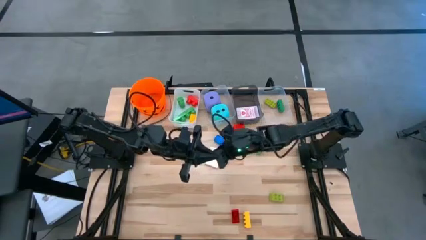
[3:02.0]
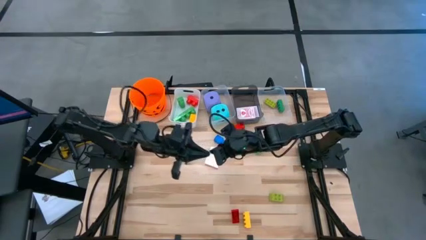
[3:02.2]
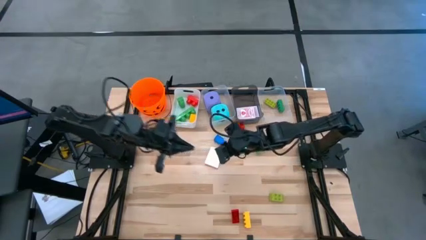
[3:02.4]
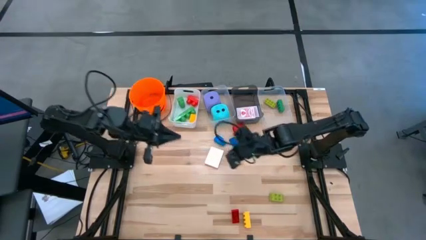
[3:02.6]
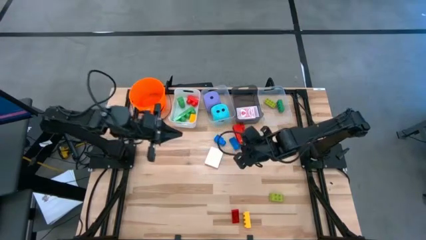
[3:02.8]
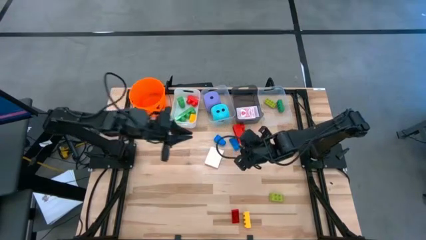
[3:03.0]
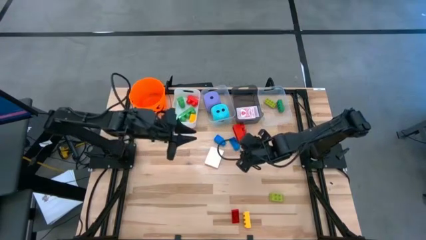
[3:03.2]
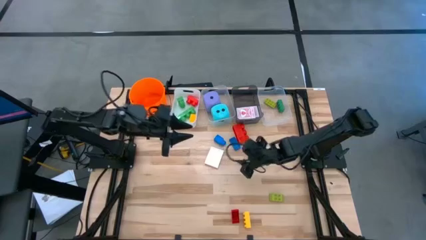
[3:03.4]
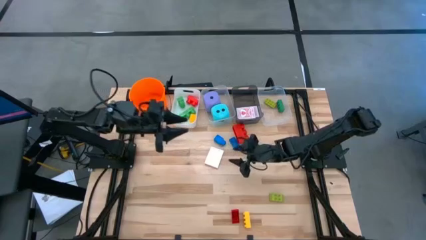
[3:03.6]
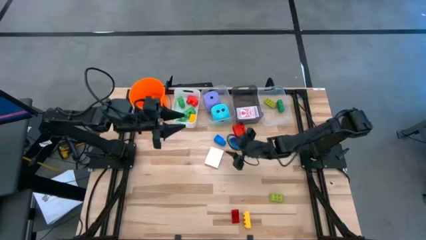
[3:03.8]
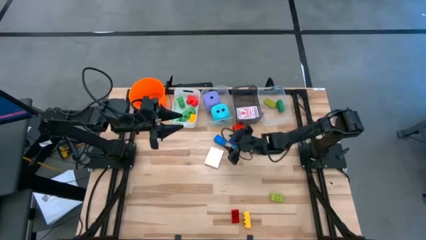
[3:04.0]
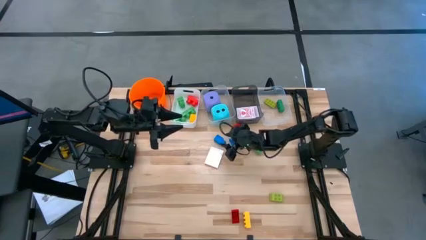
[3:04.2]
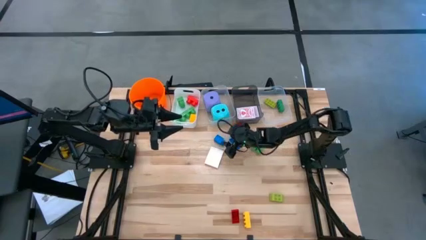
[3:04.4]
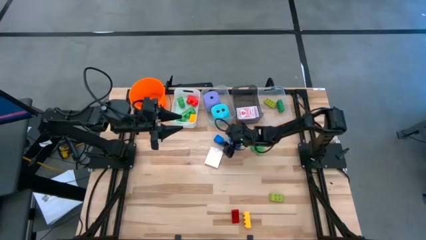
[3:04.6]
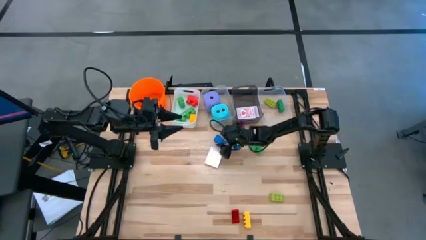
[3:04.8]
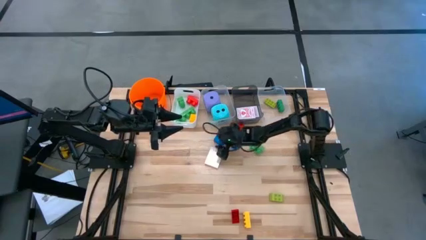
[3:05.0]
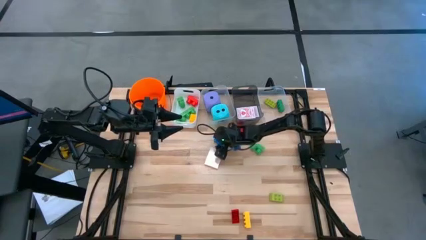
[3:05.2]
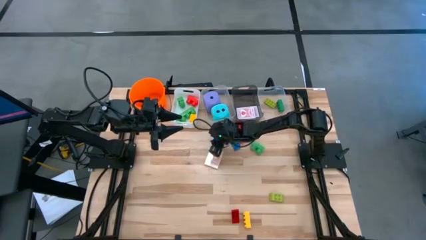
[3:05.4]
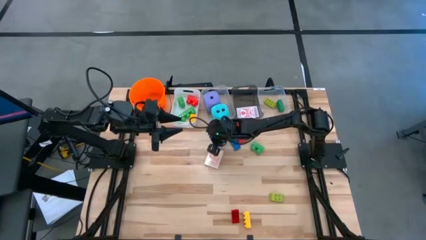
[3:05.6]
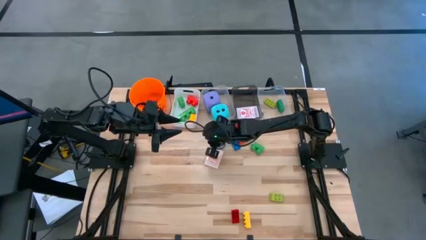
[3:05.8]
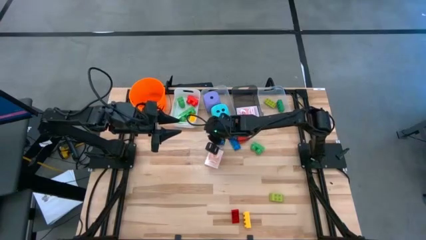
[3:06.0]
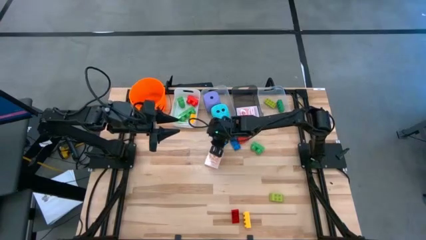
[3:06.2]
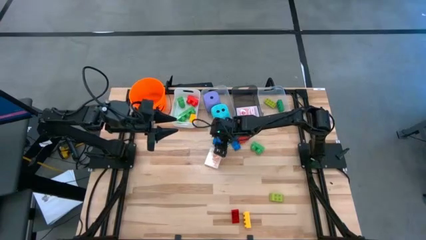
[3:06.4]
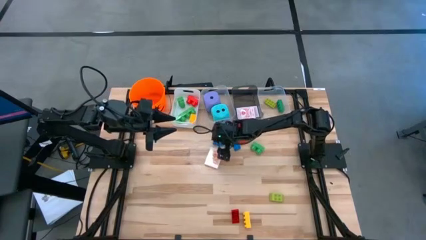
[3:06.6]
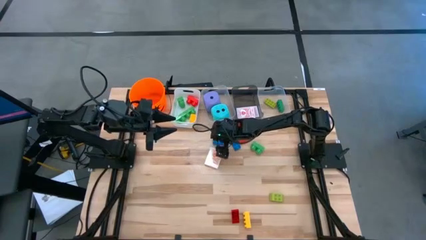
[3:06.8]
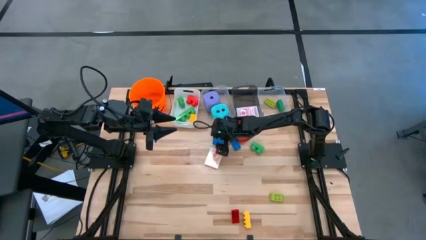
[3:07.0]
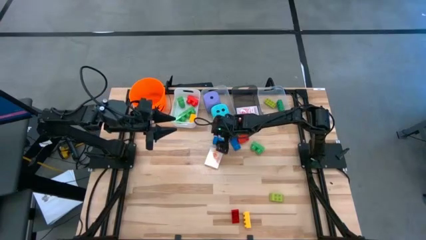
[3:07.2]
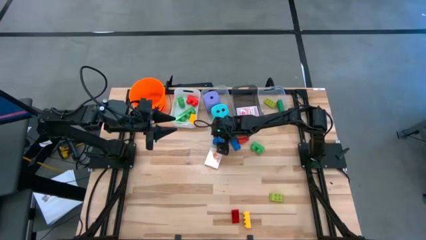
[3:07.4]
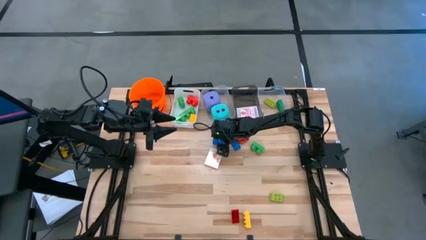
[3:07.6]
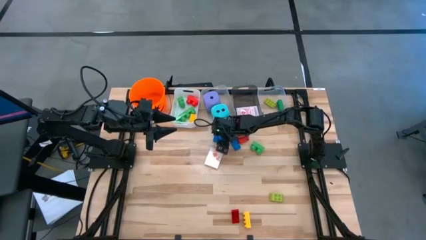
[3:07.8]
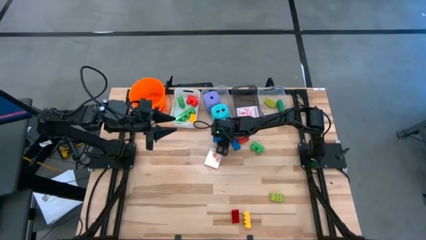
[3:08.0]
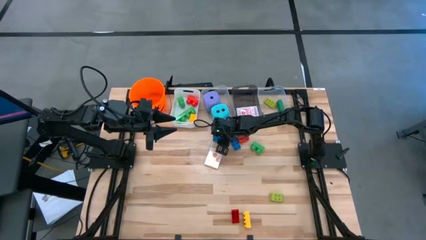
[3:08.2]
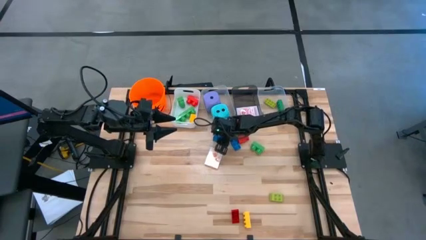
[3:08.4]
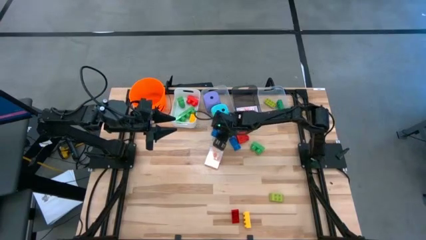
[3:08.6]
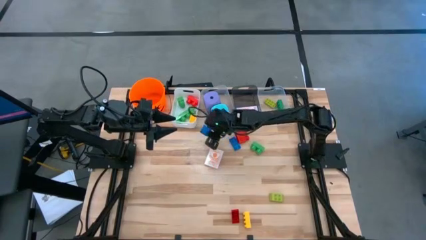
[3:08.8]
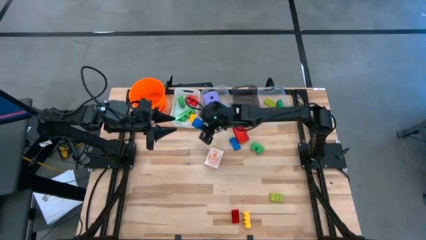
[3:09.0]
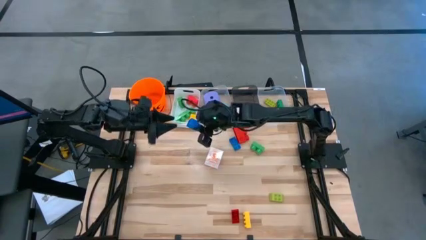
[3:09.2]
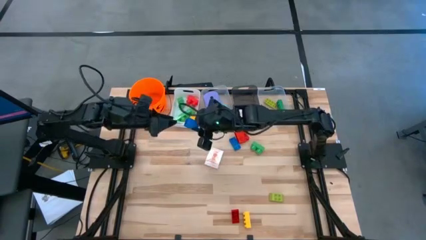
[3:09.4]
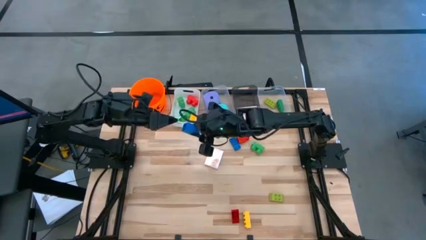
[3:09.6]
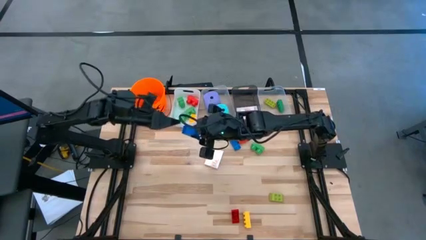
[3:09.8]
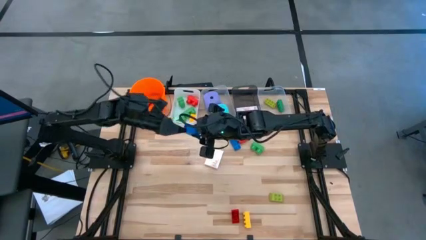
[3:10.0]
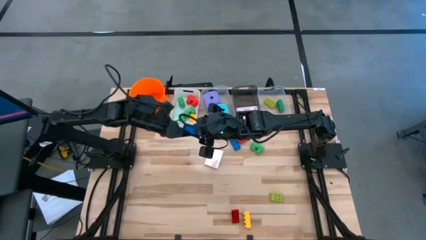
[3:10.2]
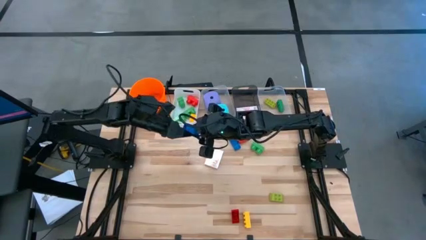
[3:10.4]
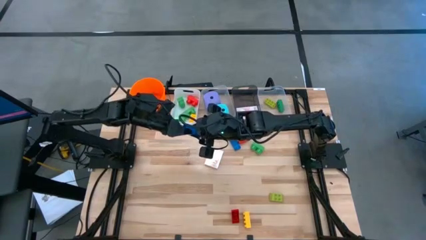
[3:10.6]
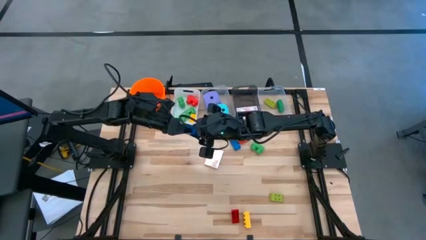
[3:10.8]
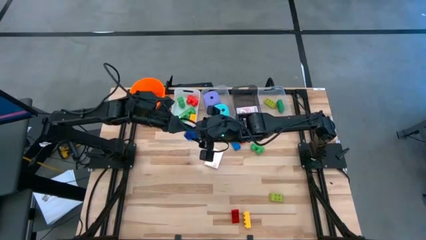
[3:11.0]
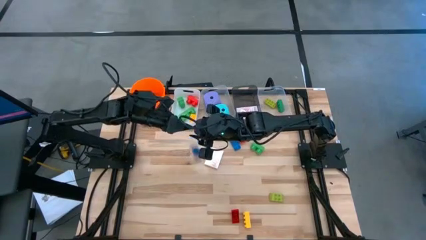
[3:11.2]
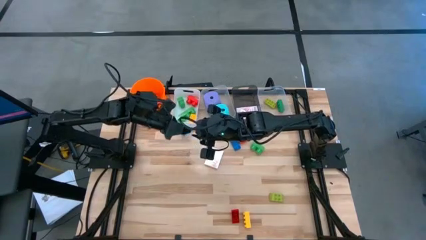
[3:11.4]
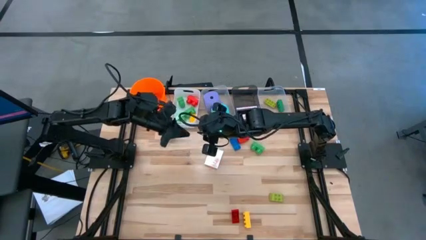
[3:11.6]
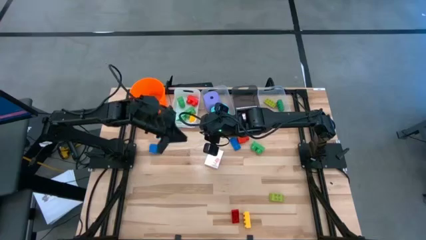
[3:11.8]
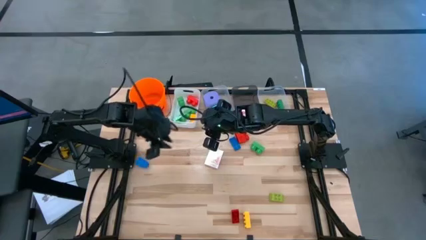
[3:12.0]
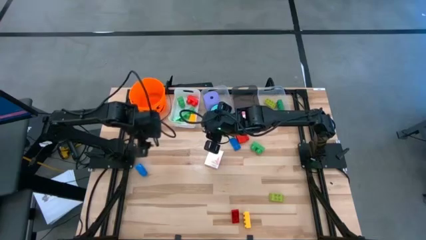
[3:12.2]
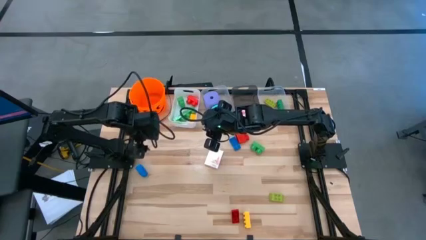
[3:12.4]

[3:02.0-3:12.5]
Task: Pick & Place Toys
Put the 1 stud blue game piece into the white bin

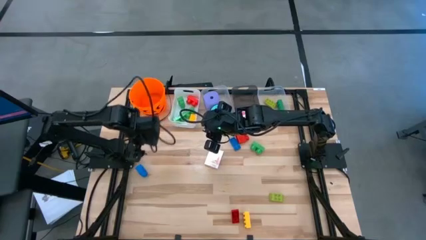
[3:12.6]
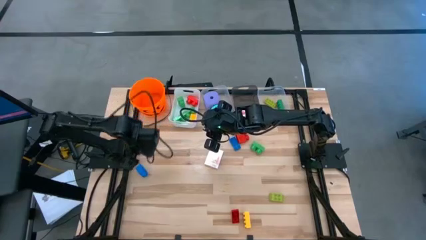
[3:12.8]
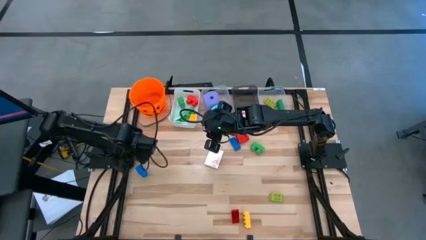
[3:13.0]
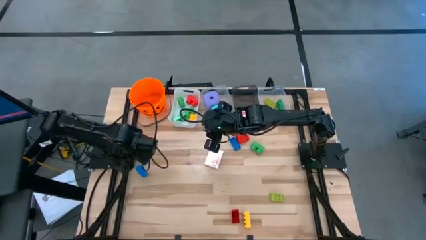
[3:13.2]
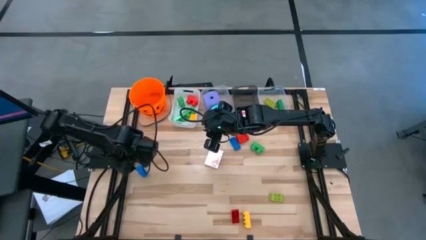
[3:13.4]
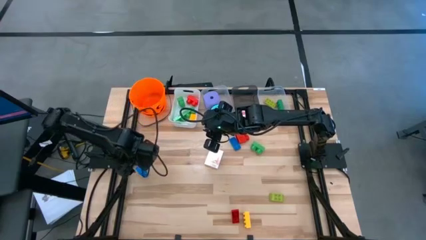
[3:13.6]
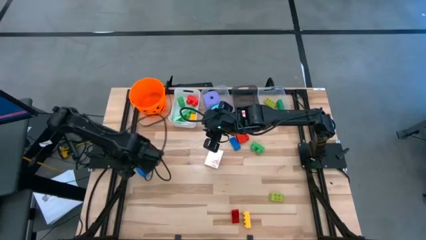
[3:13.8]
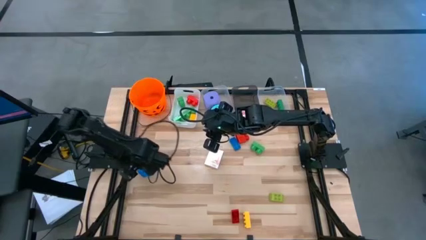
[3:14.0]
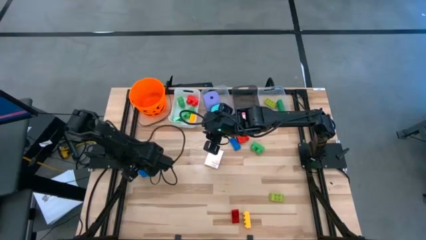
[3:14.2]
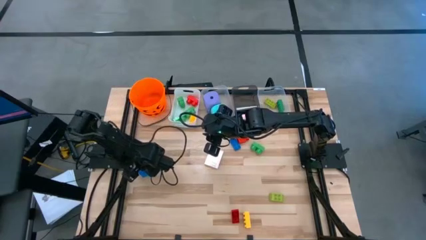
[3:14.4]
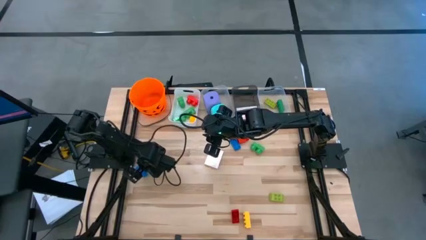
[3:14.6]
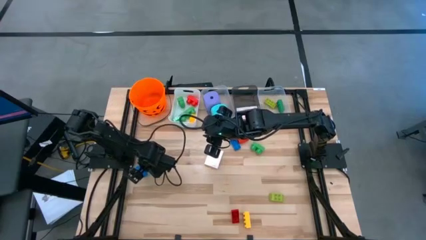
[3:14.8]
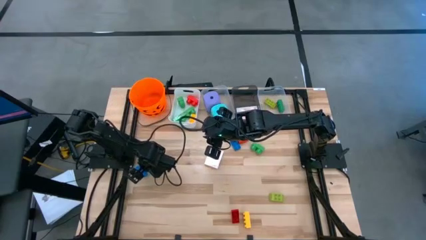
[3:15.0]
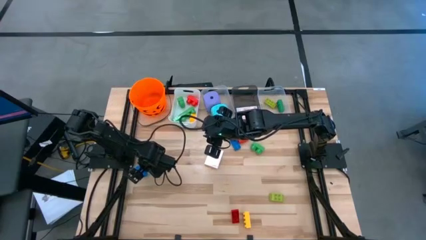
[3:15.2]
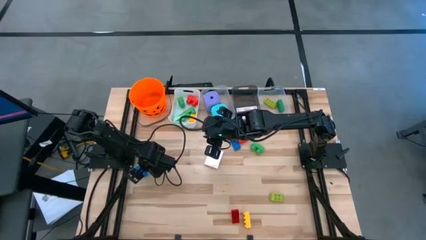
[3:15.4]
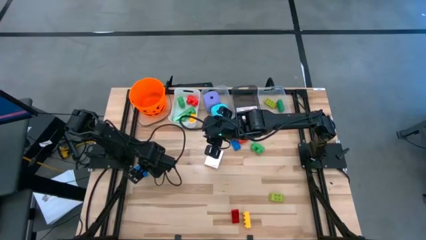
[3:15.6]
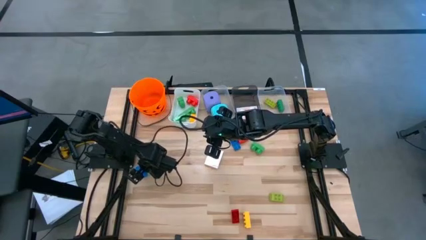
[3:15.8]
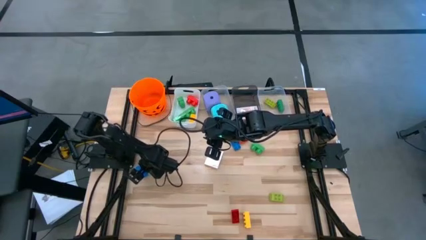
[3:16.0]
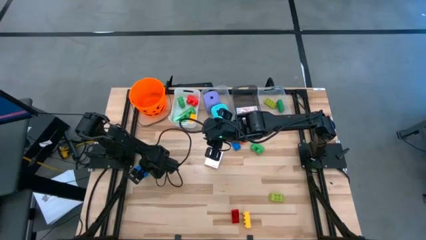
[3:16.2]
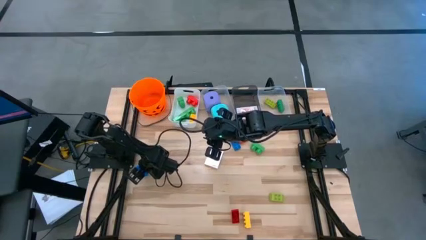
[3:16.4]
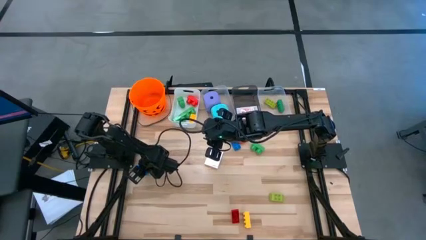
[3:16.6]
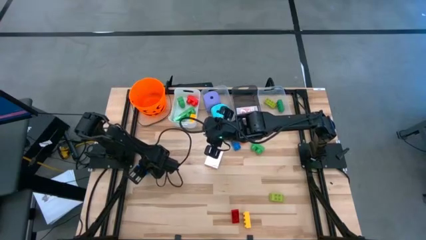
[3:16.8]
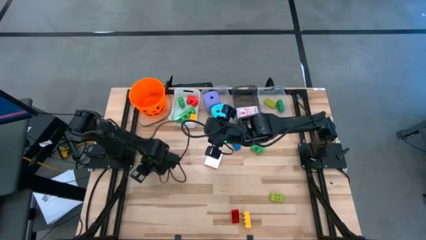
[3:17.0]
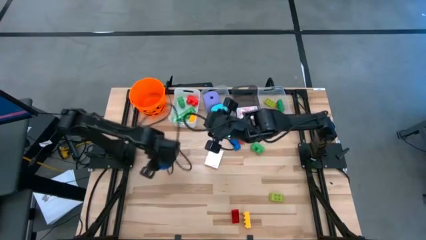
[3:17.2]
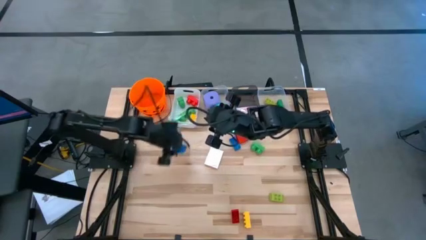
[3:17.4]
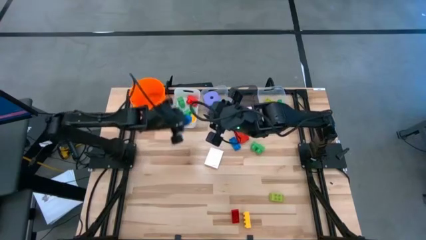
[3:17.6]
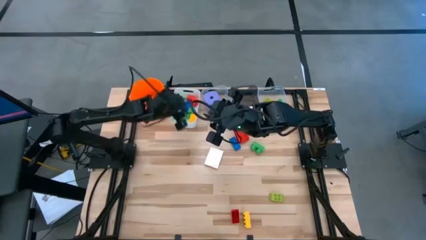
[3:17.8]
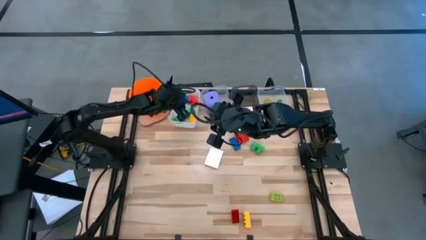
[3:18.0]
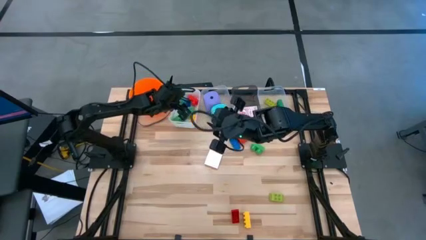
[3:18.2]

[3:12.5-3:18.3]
Put the 1 stud blue game piece into the white bin
